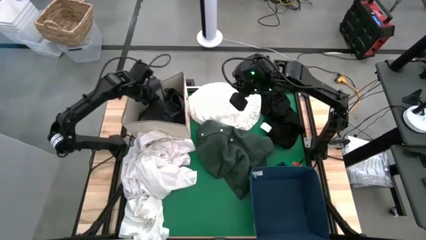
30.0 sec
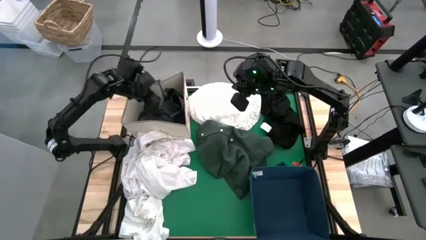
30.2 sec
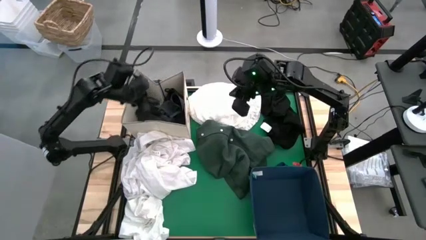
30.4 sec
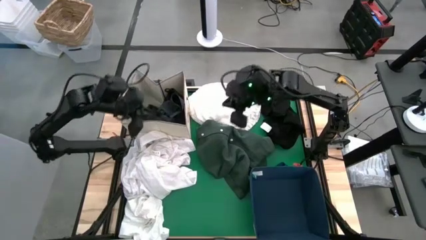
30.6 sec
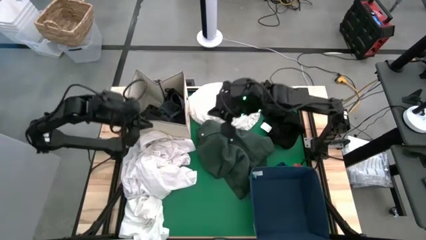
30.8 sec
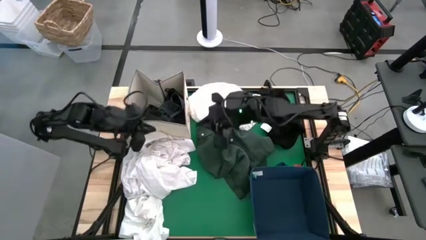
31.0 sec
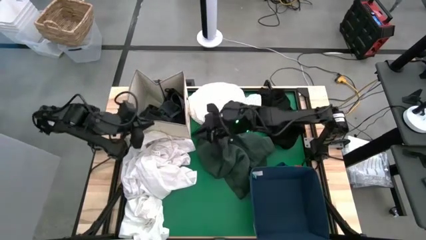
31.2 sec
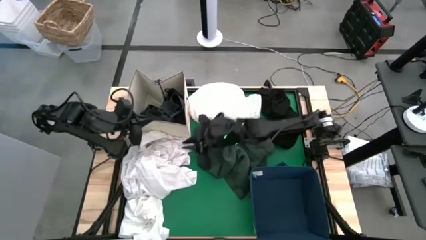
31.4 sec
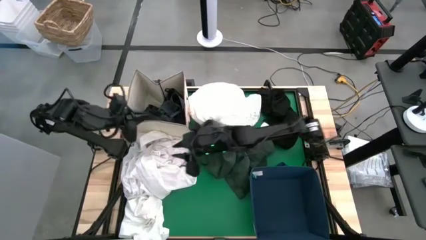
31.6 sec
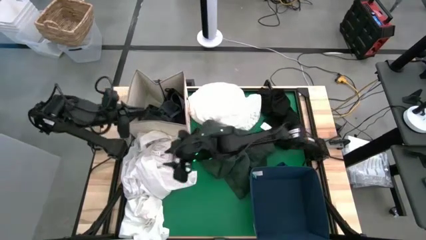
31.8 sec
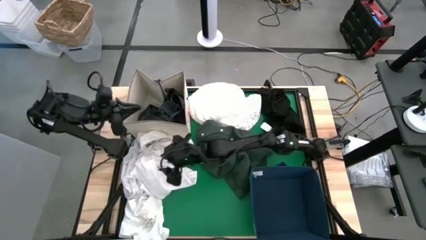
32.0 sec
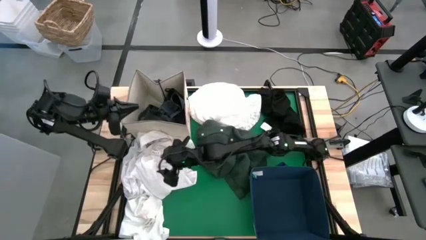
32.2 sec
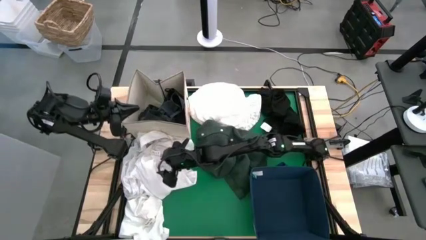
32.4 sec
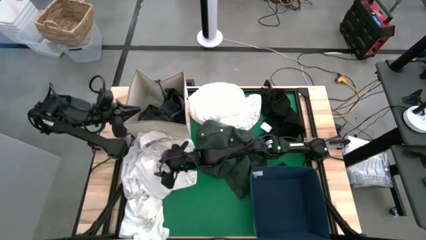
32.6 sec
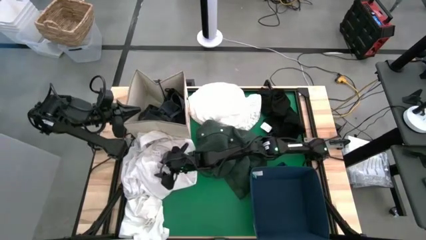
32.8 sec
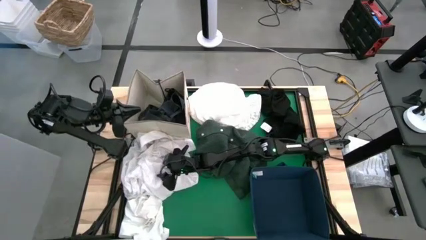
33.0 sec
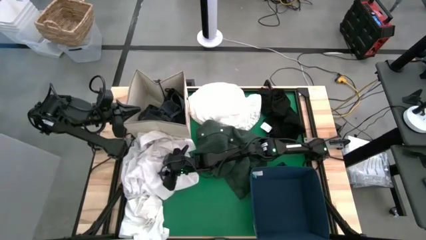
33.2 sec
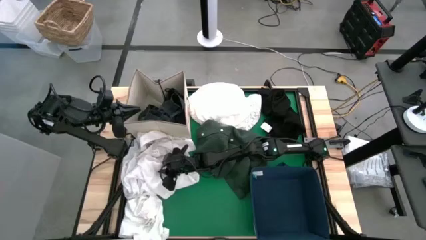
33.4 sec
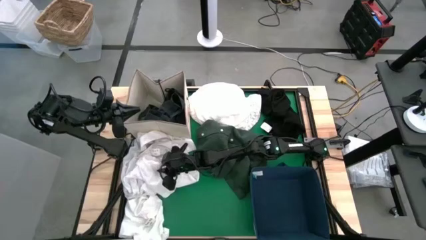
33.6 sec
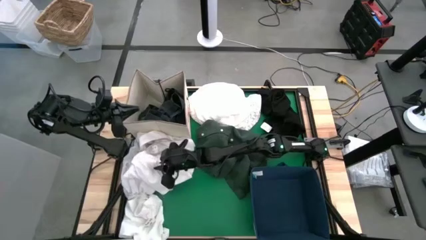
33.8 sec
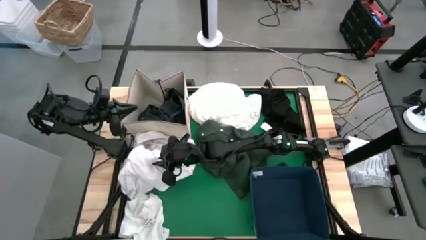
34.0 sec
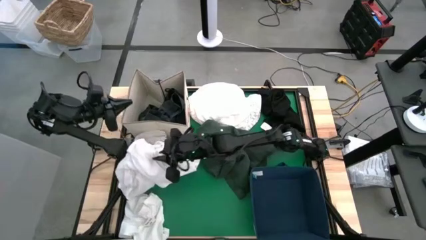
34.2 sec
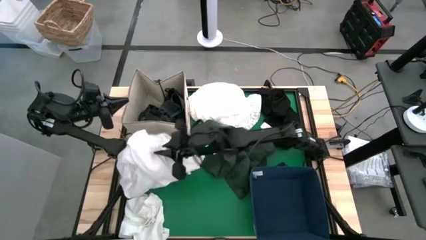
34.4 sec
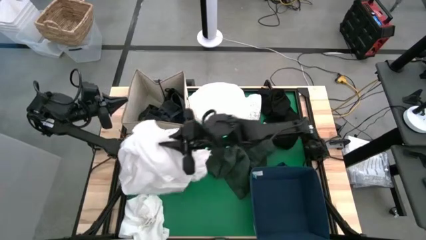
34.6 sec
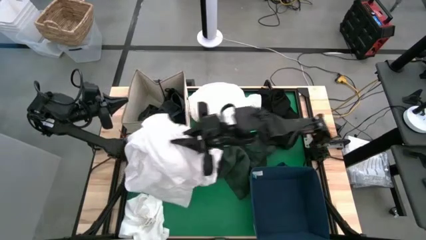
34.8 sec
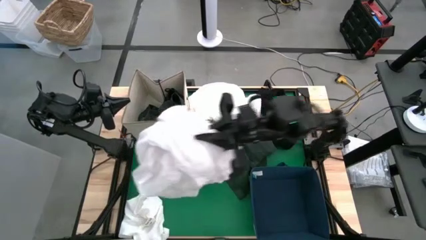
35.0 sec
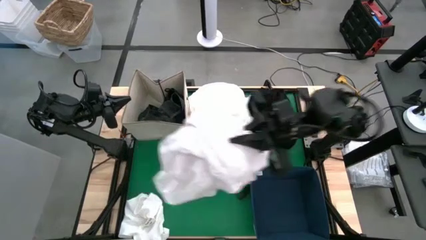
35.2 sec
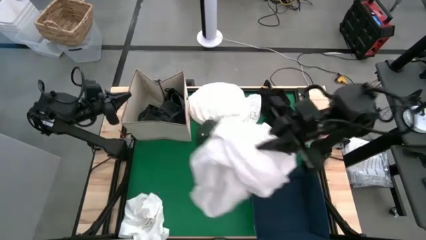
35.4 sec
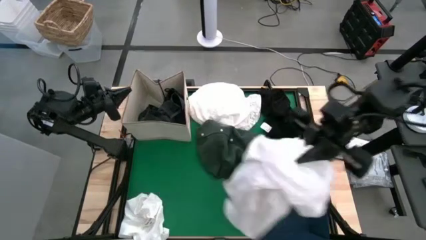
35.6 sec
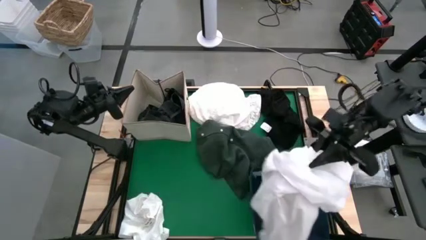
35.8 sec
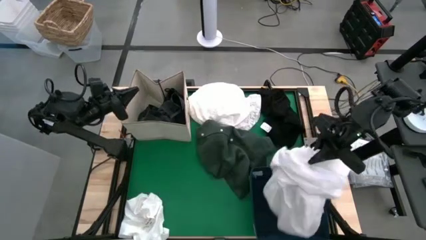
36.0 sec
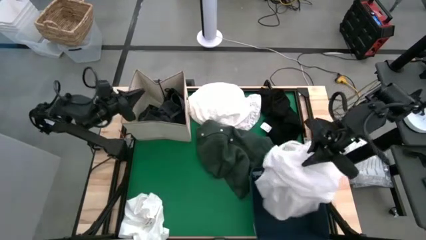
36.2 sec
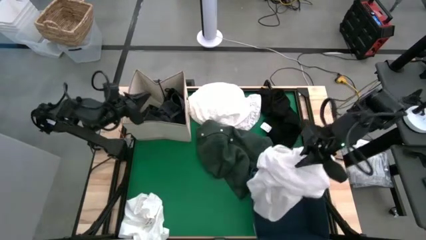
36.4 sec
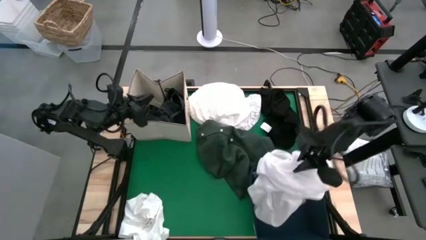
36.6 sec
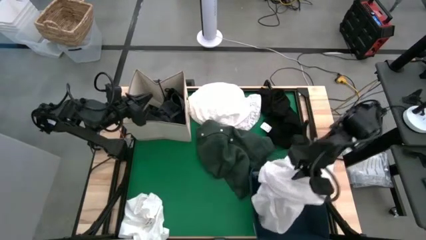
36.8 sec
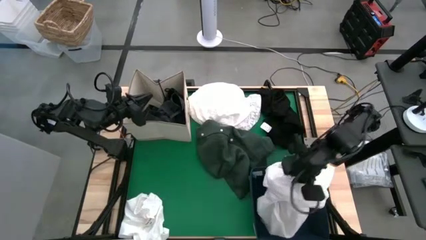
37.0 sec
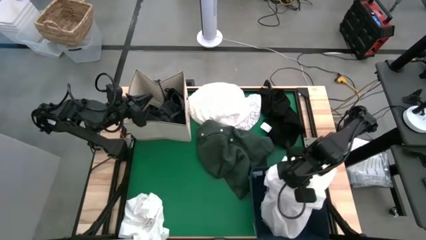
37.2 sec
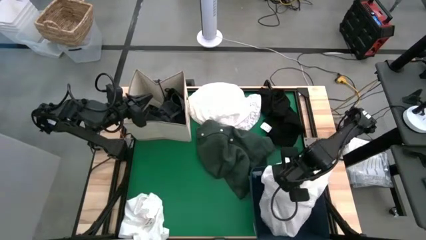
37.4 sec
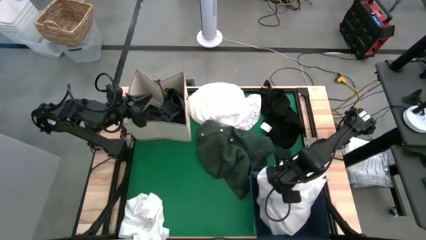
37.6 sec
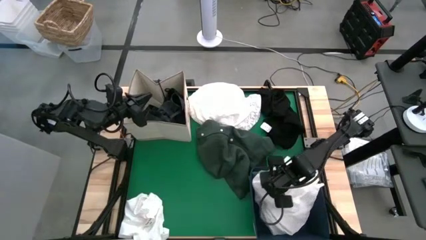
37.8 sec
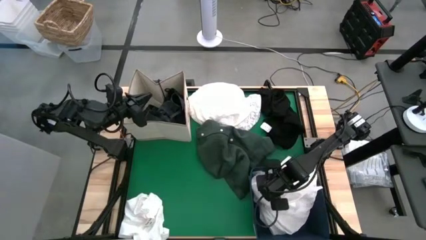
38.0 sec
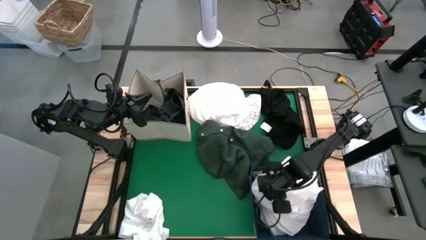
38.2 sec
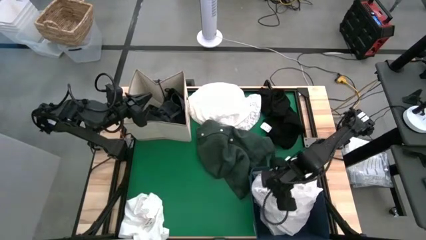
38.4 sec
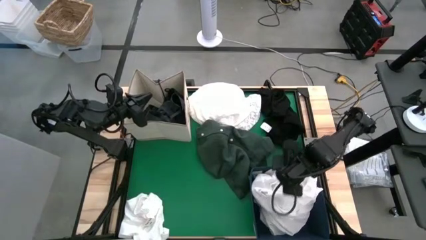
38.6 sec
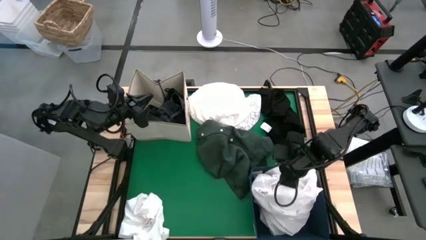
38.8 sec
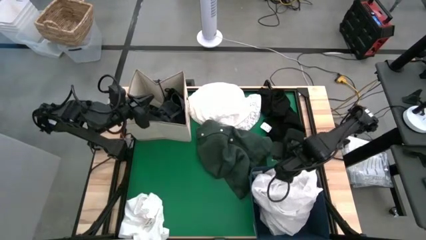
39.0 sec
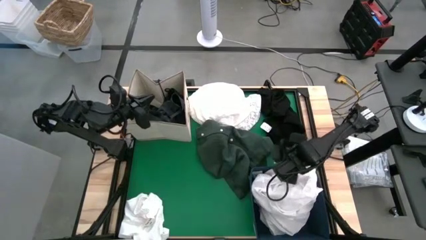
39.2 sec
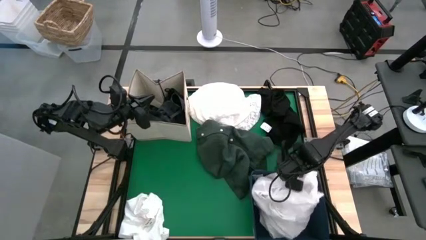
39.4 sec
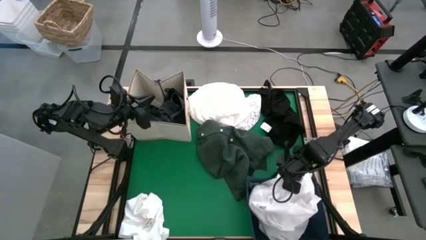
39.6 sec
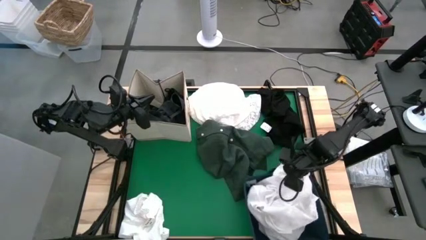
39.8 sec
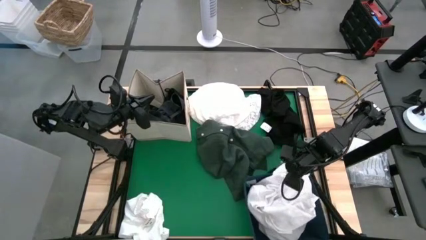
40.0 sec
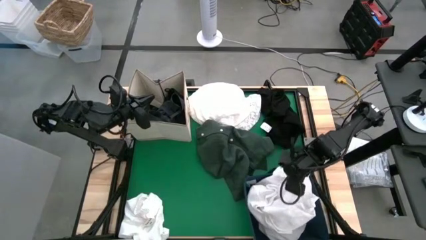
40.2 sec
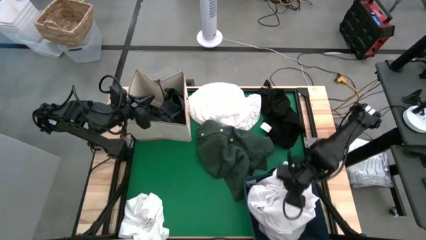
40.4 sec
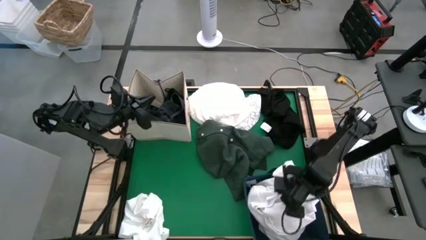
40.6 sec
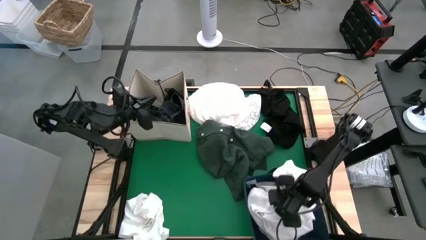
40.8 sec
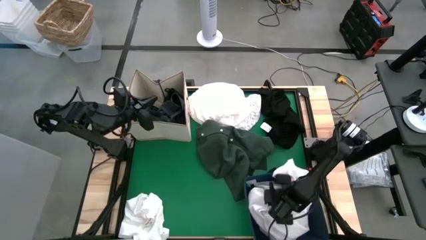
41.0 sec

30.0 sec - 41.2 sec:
Put the center white cloth into the blue bin
